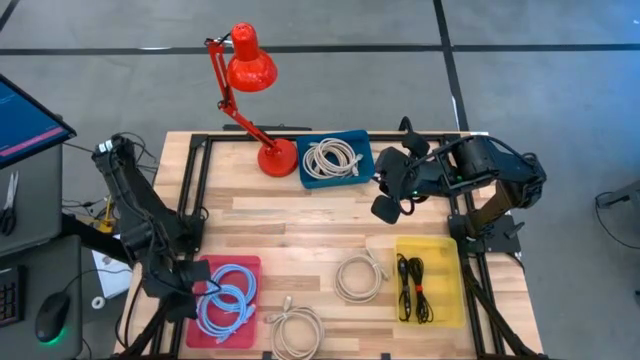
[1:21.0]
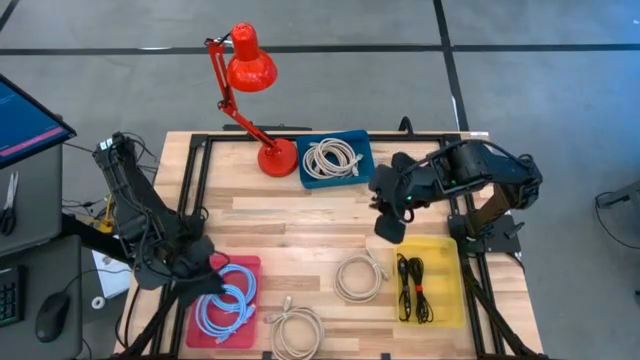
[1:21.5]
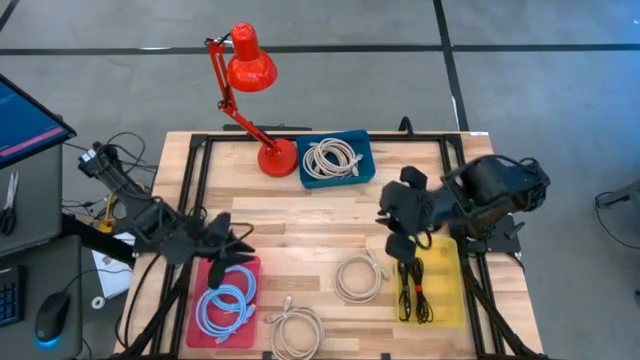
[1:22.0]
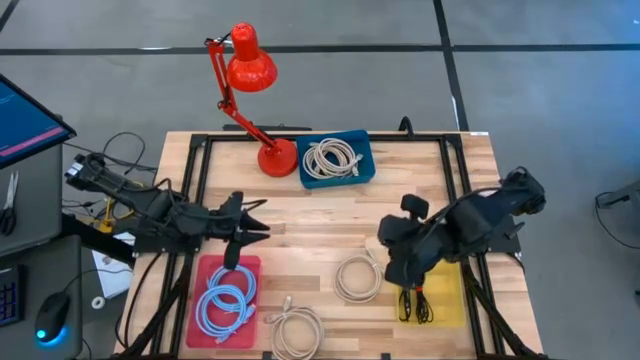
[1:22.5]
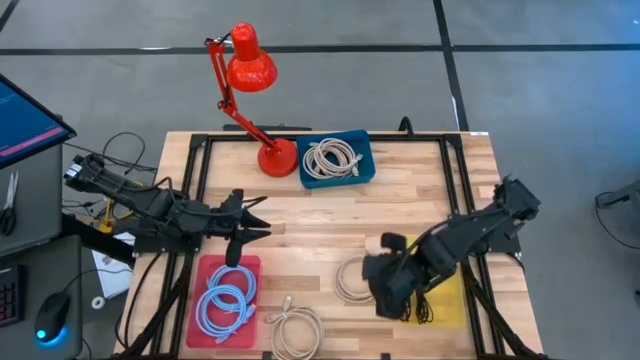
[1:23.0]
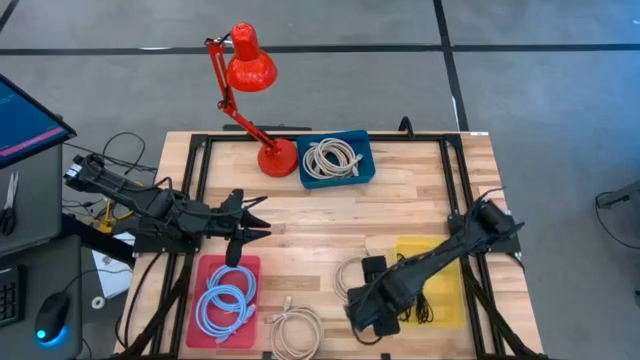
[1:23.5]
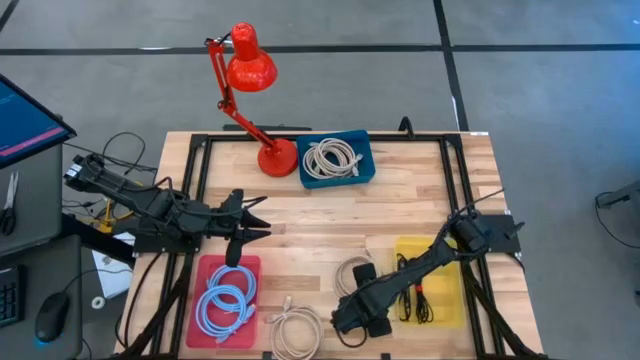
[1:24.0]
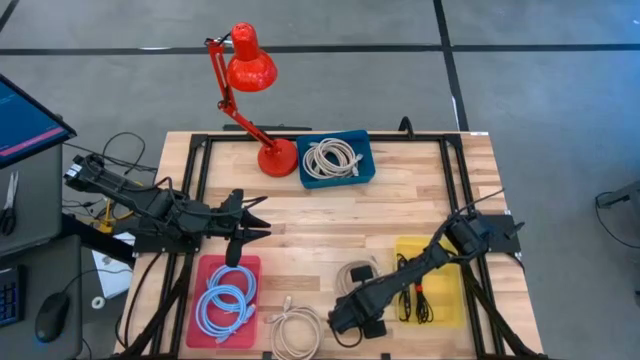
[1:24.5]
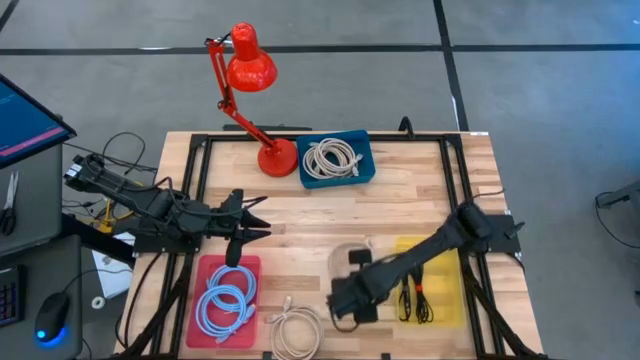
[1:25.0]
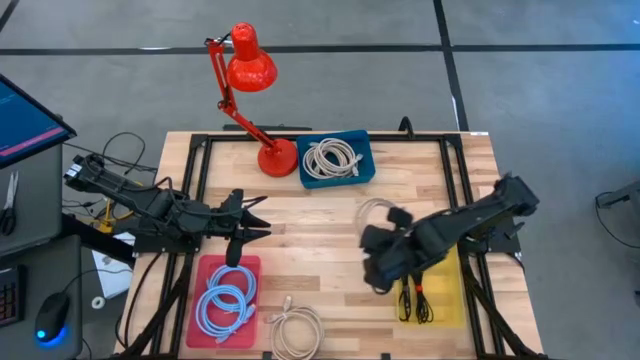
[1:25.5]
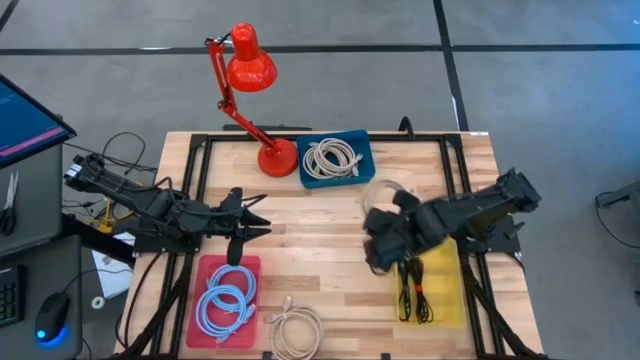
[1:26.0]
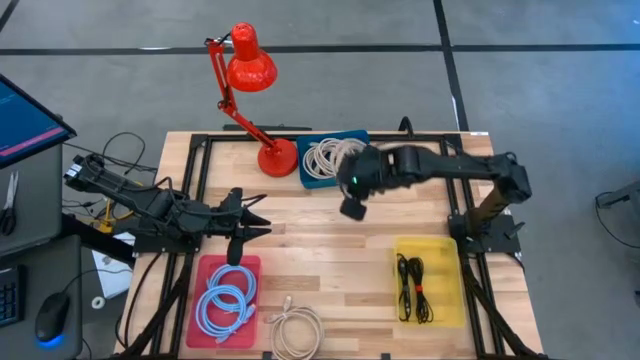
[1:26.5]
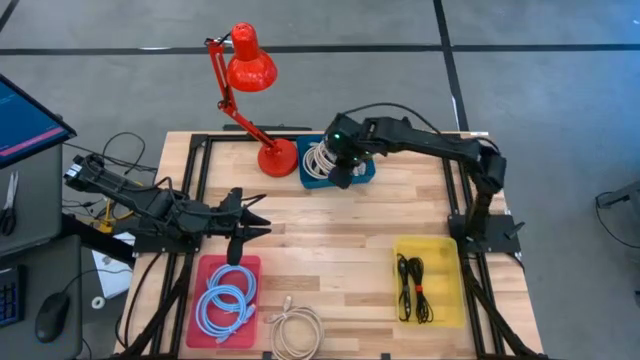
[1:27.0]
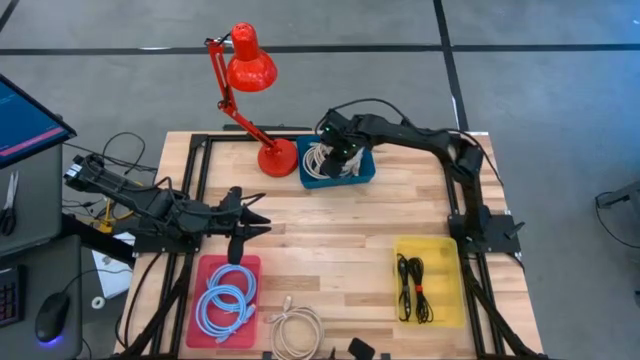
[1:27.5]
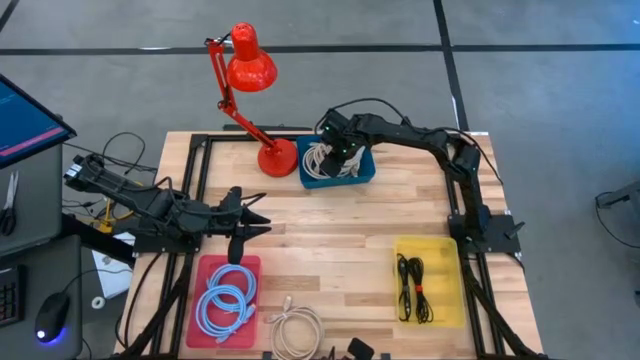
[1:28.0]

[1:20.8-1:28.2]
Task: Sort HDMI cables
Put the brown HDMI cable into the blue bin

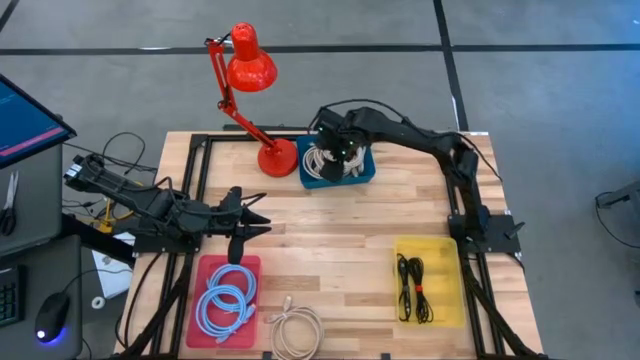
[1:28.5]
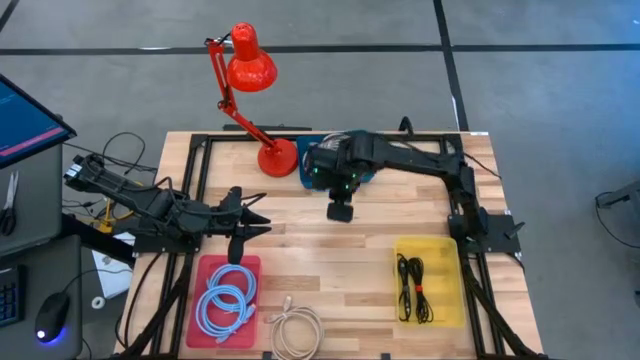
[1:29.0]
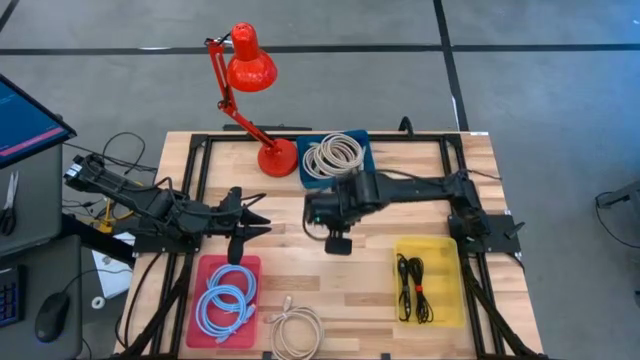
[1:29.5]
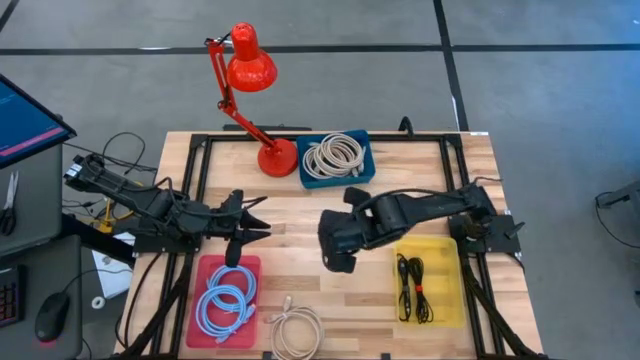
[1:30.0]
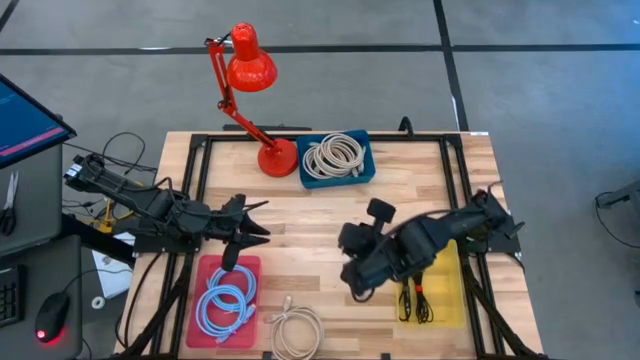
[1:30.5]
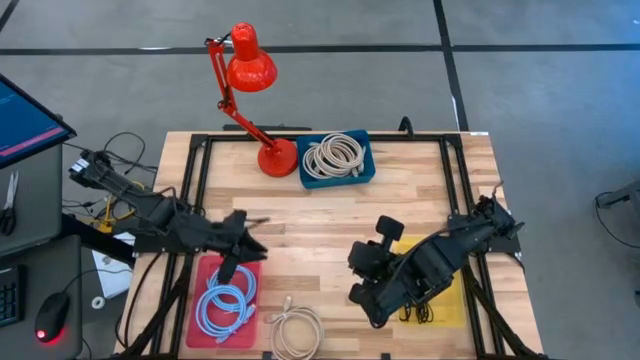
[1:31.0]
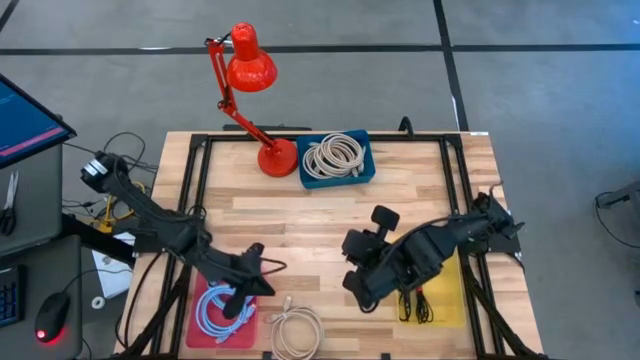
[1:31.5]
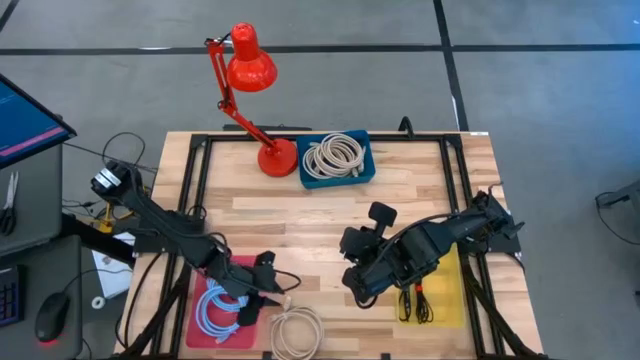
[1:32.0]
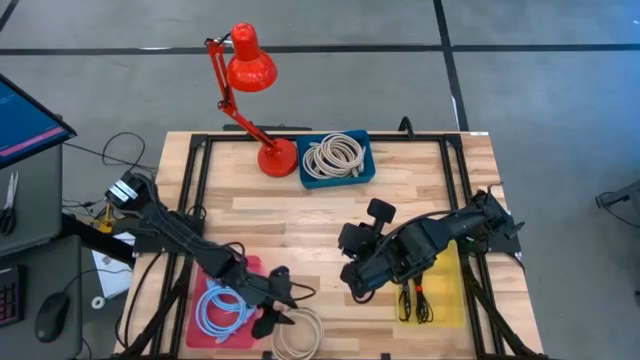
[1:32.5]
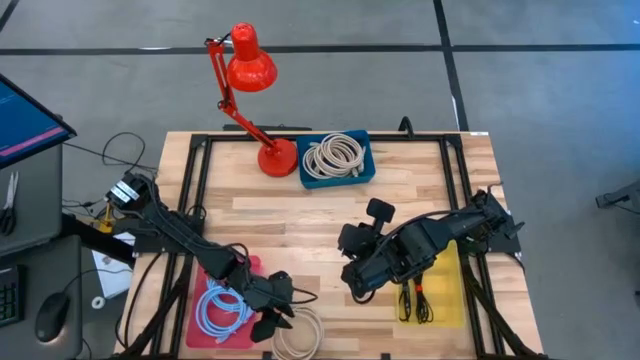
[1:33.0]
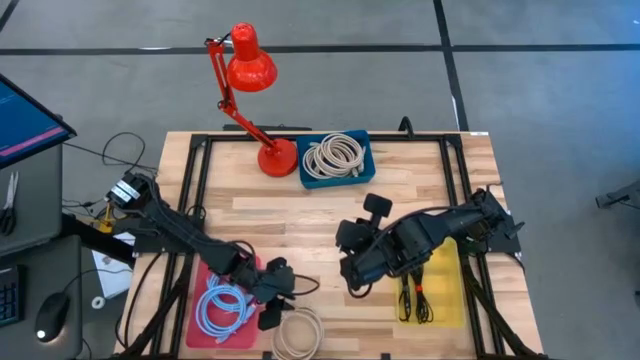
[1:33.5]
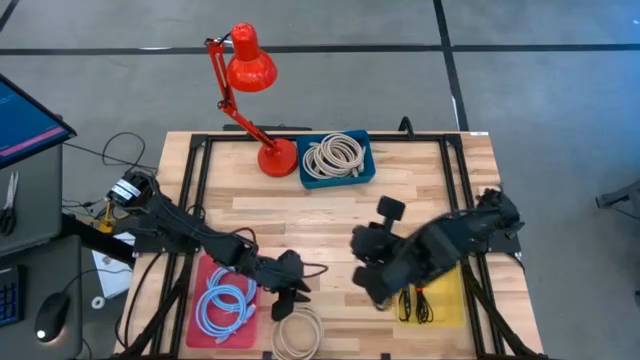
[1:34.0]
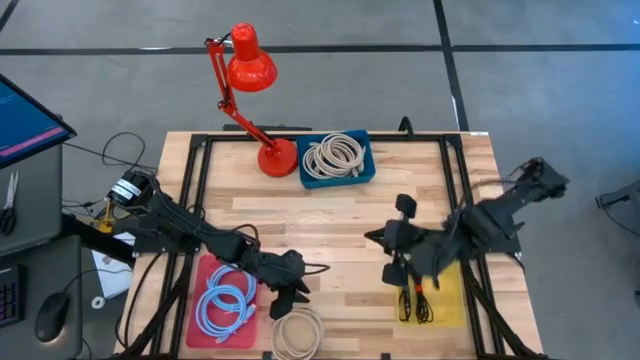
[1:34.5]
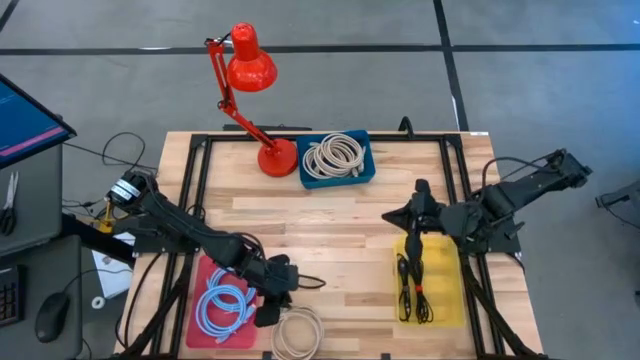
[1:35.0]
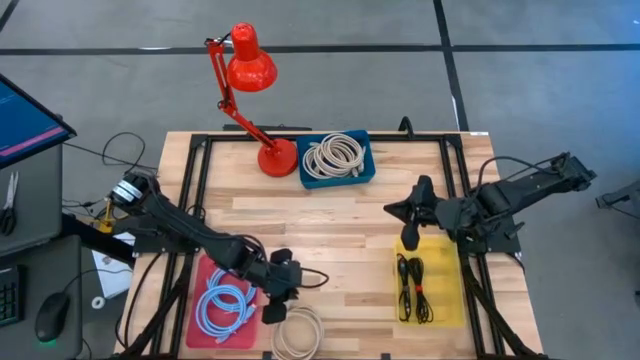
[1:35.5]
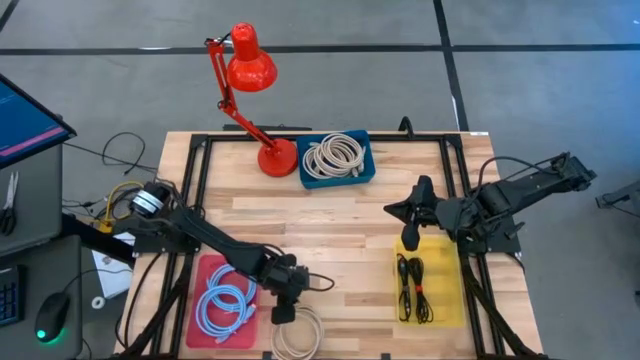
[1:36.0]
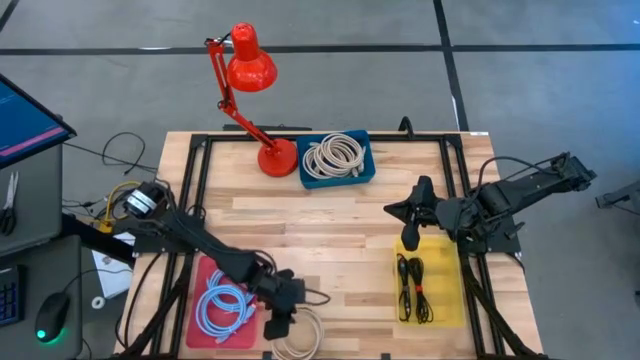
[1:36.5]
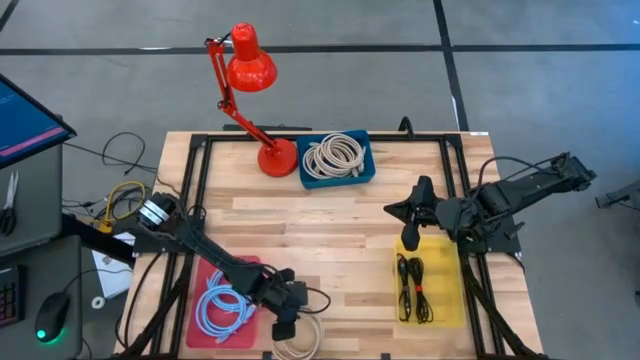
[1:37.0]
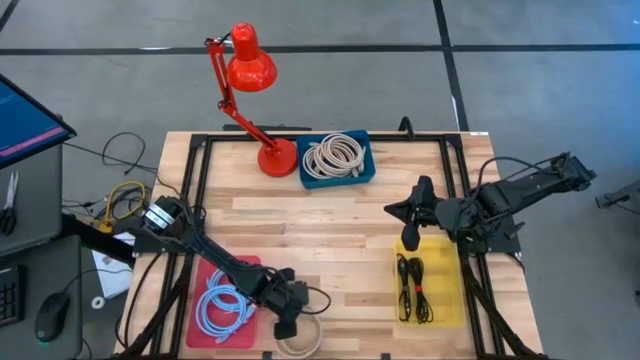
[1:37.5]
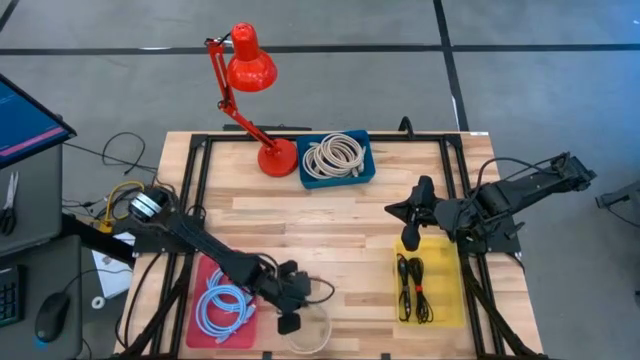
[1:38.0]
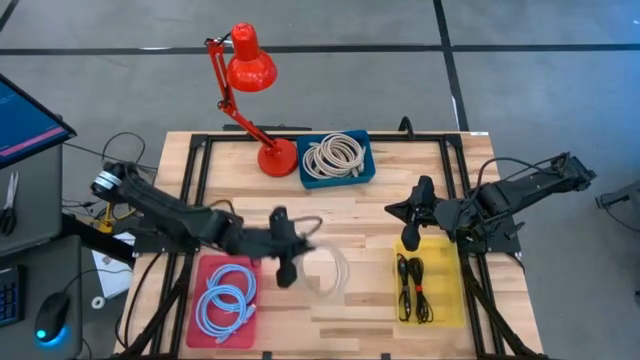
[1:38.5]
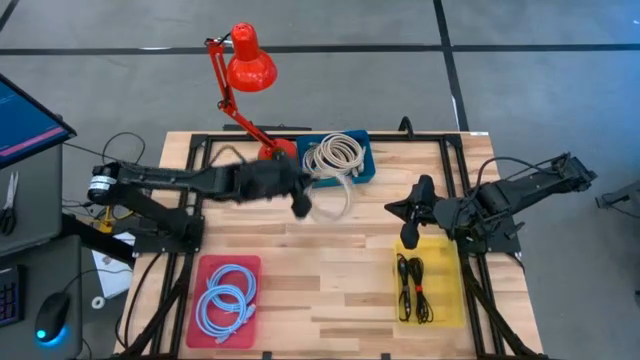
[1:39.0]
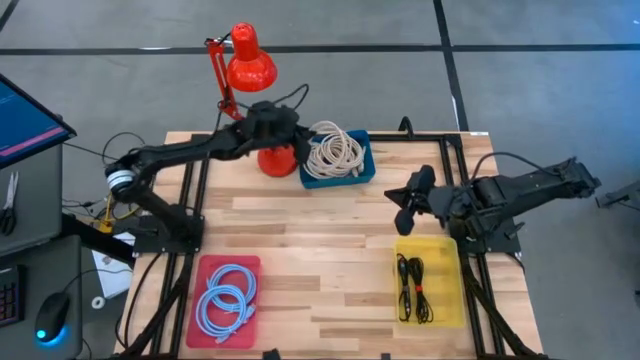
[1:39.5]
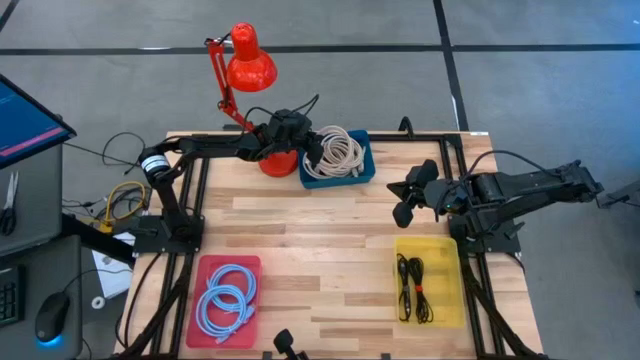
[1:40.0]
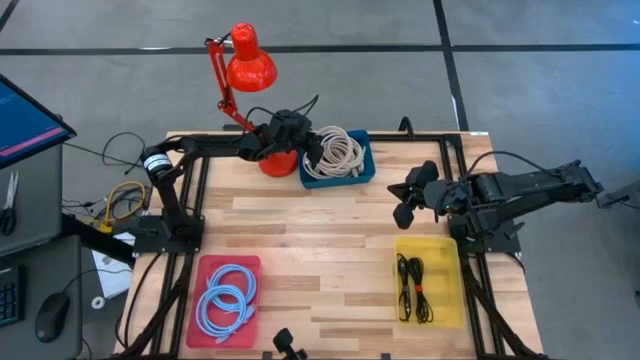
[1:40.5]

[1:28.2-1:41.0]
Put the brown HDMI cable into the blue bin

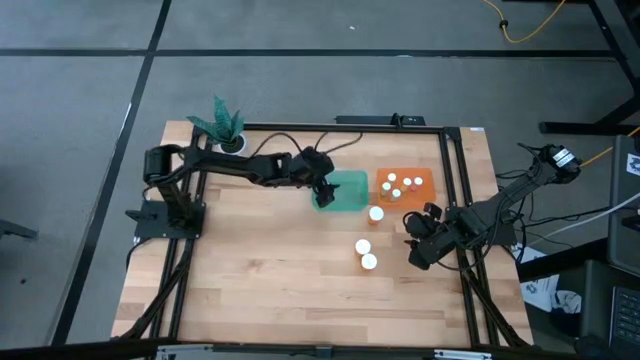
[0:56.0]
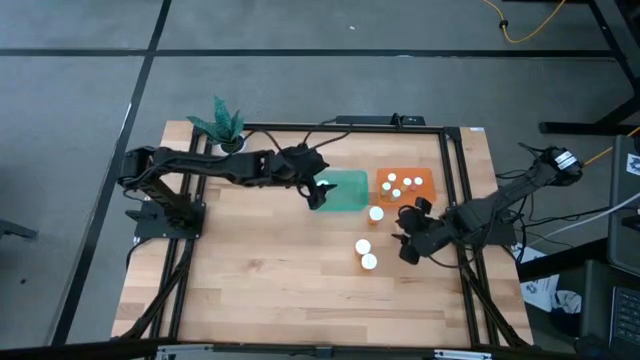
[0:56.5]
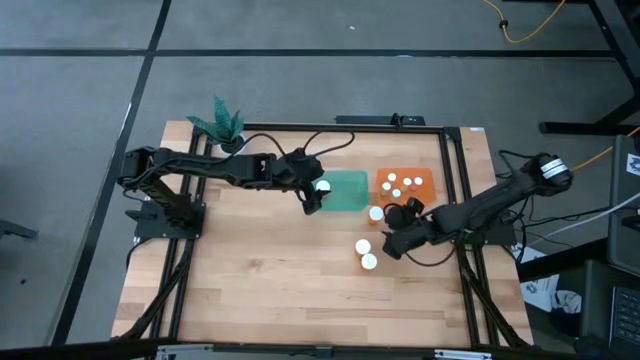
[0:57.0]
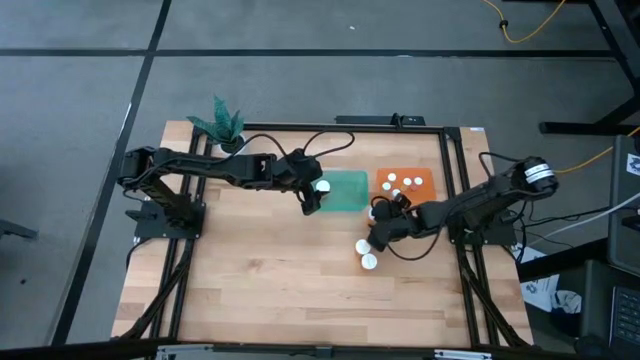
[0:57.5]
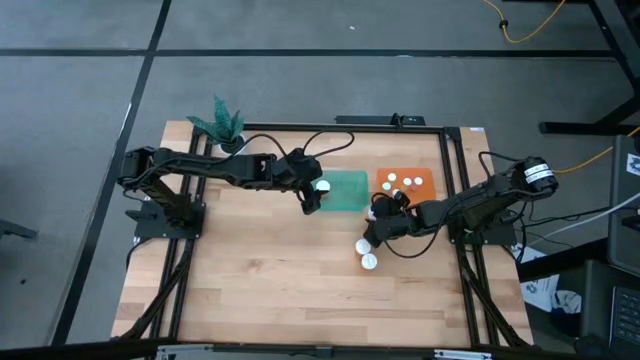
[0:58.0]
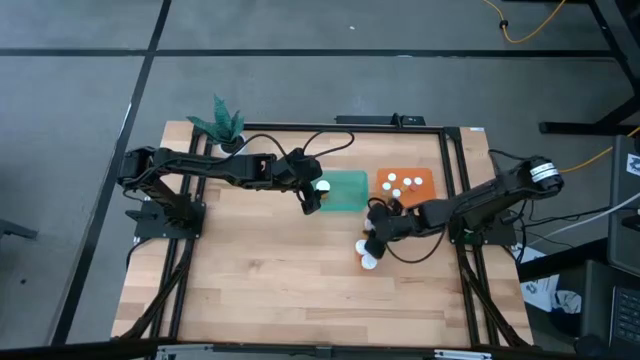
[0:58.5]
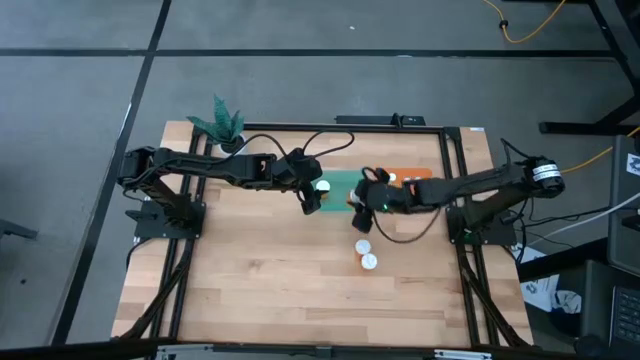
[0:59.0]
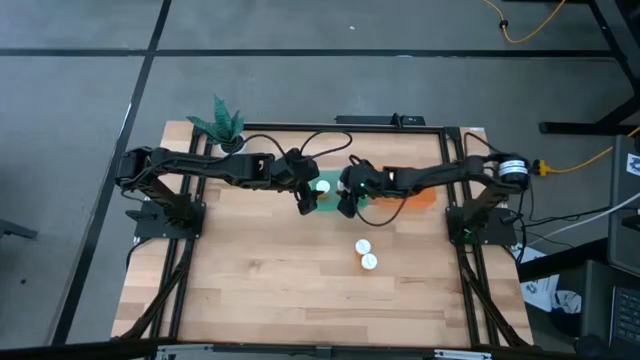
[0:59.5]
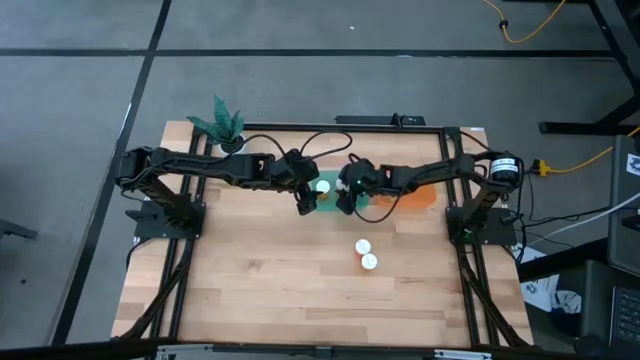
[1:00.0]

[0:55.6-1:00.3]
Task: Pick and place medicine bottles into bin by pill shape (circle, oval)
Put the orange pill bottle into the green bin
